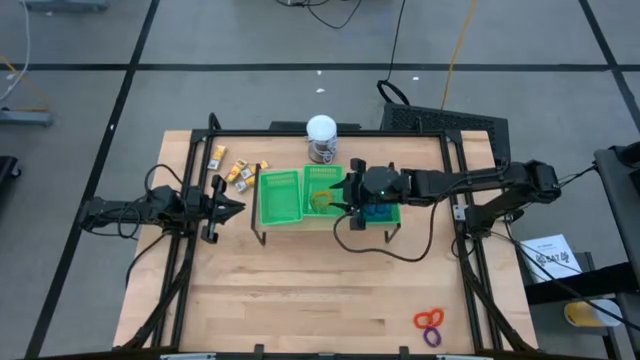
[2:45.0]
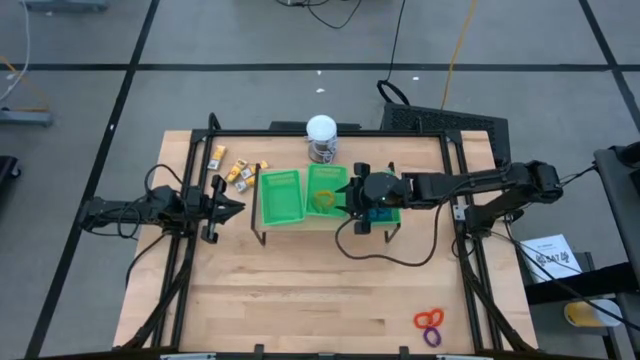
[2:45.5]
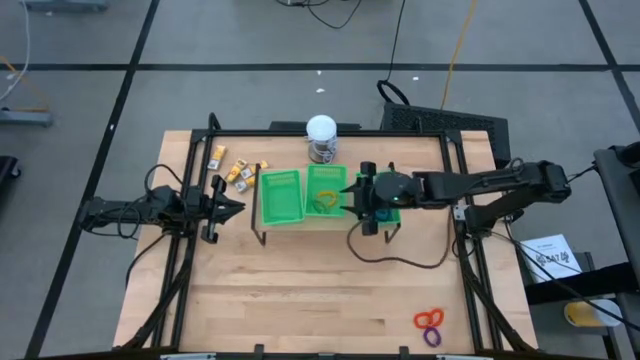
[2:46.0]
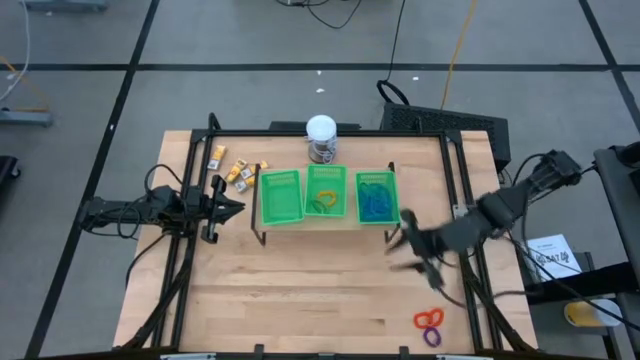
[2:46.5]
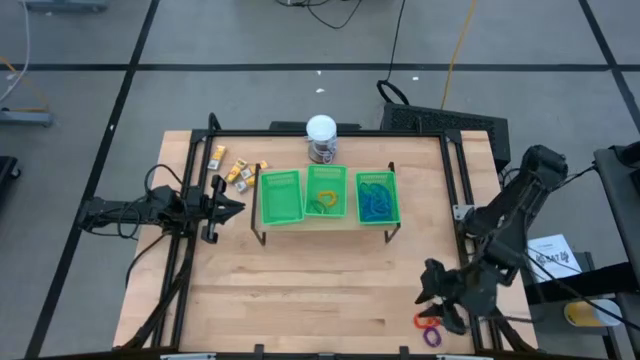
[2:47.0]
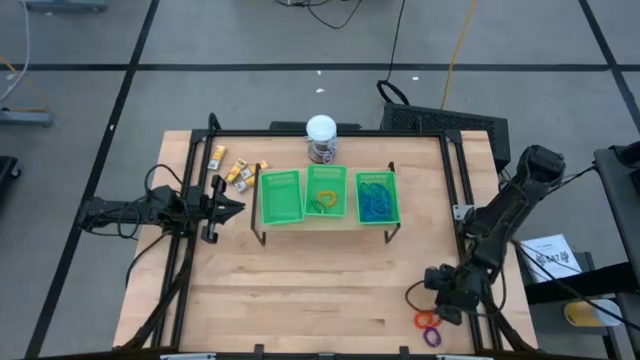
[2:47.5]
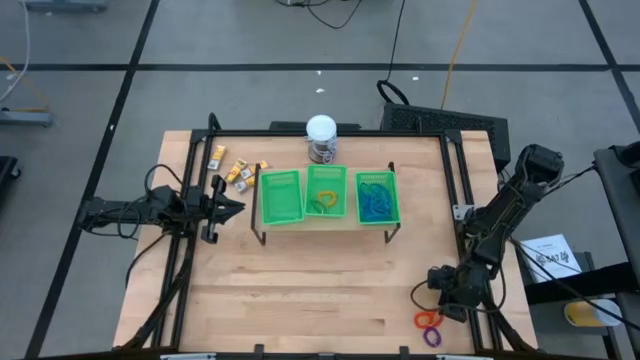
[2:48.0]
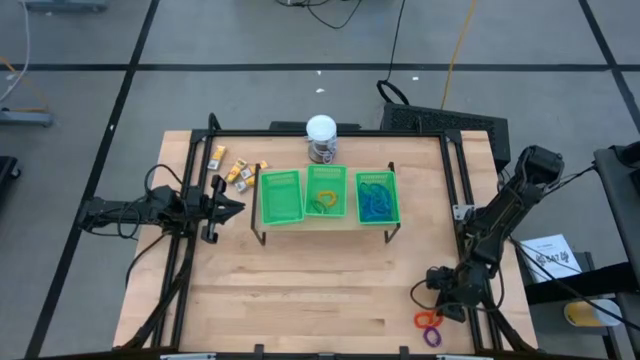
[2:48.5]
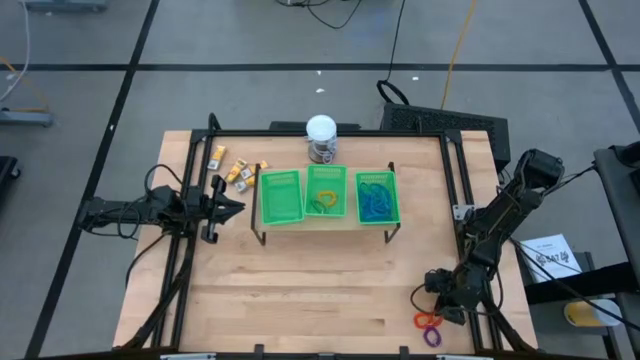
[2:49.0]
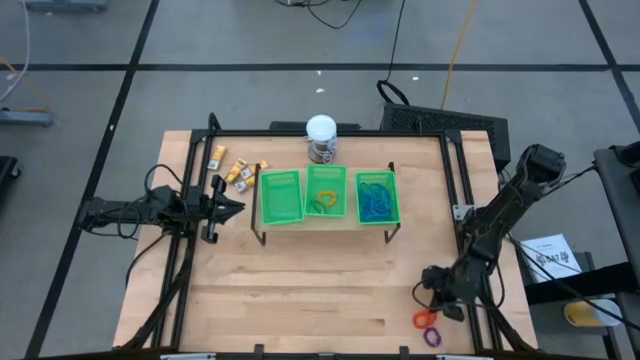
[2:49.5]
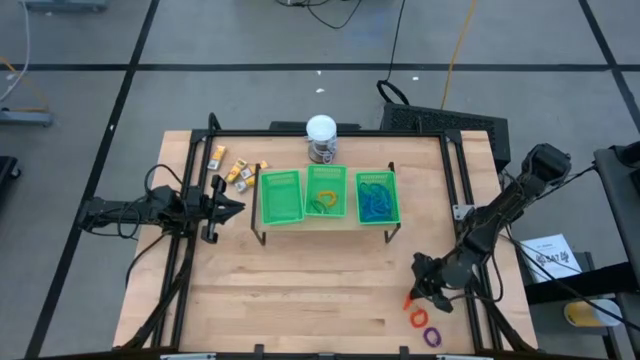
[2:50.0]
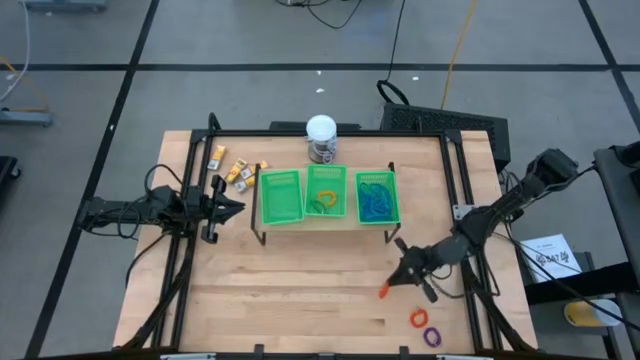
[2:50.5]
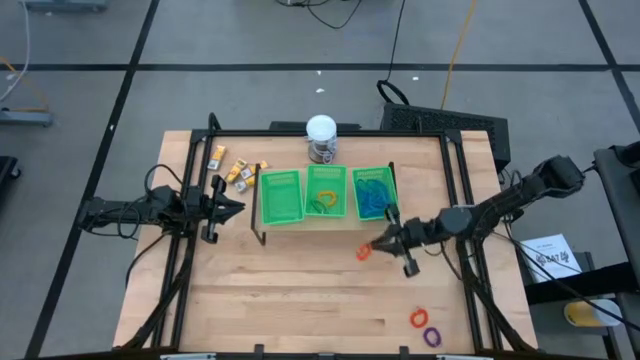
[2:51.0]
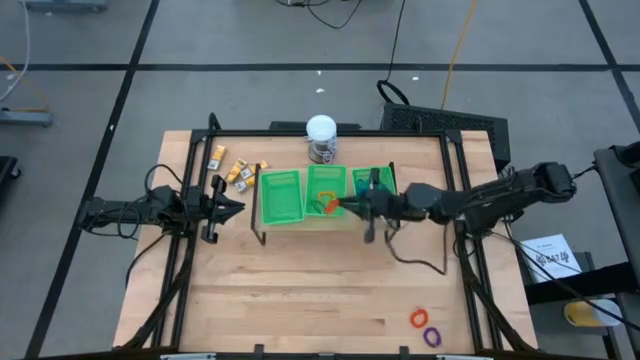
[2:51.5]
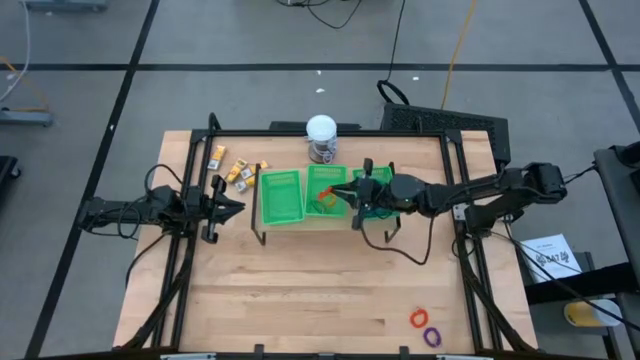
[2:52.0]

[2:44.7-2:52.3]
Task: Pick & Place Office Desk Supplies
Put the orange spring keychain into the center green bin on the shelf

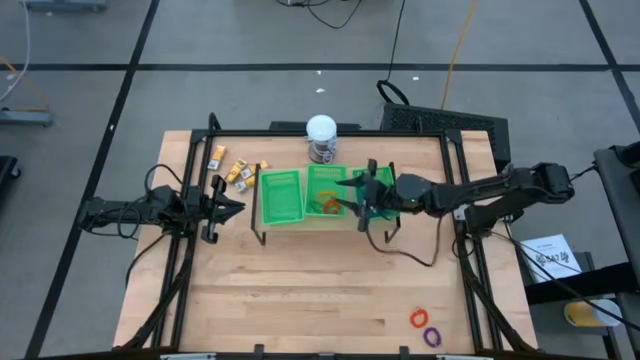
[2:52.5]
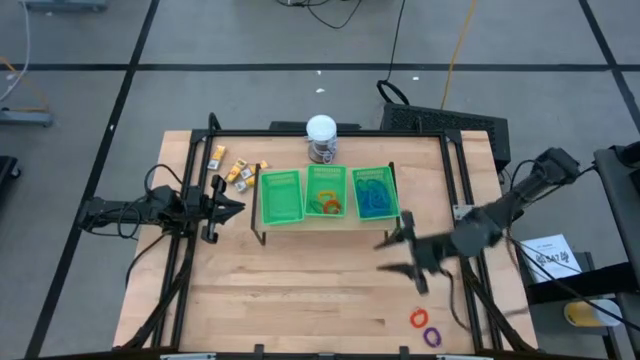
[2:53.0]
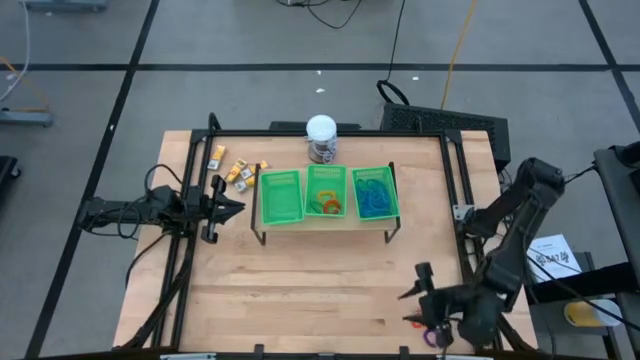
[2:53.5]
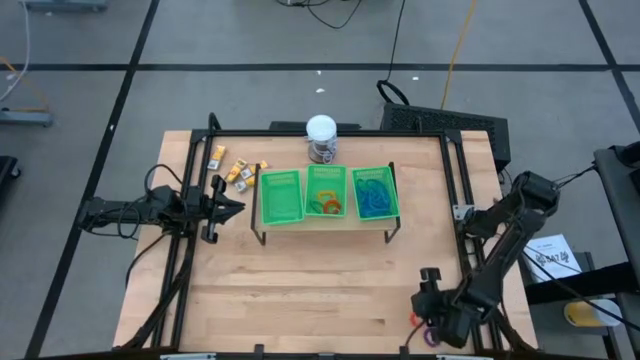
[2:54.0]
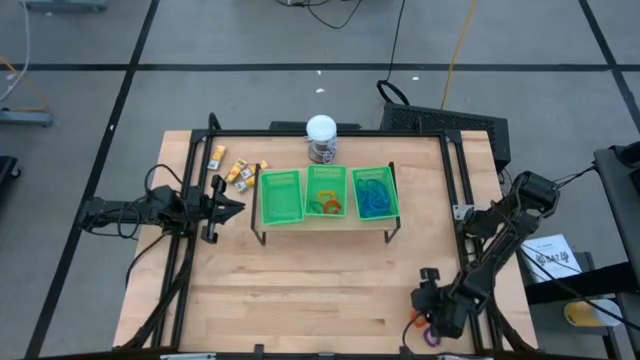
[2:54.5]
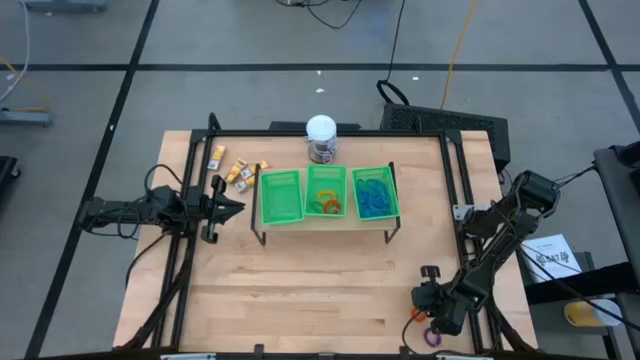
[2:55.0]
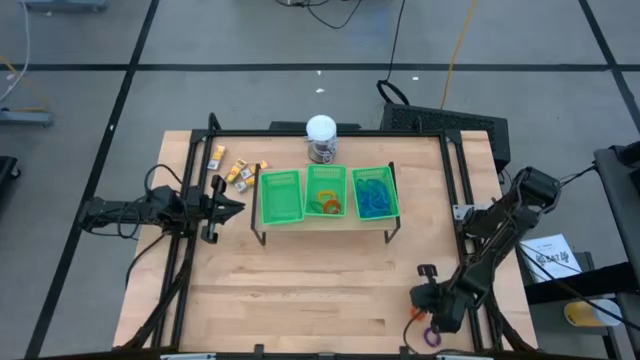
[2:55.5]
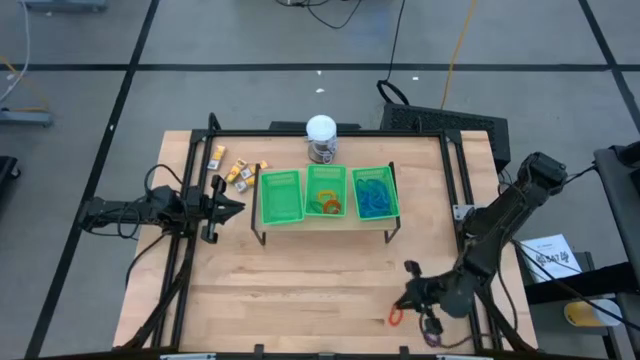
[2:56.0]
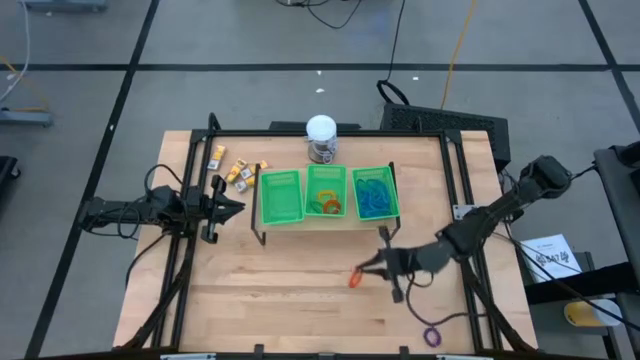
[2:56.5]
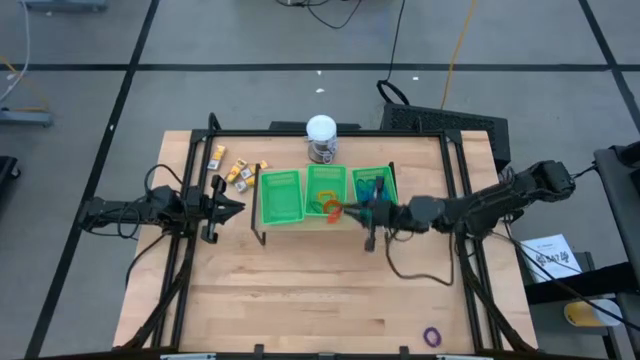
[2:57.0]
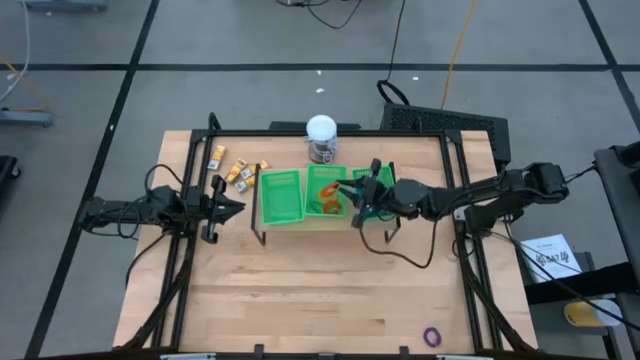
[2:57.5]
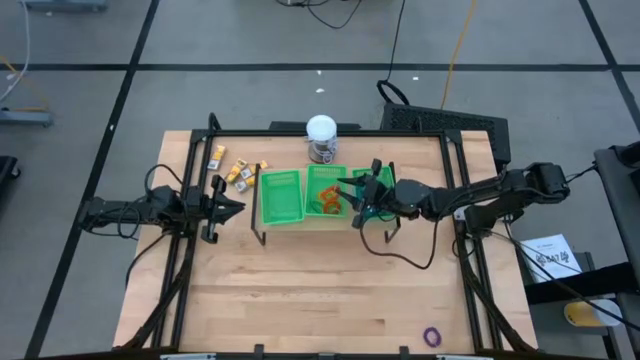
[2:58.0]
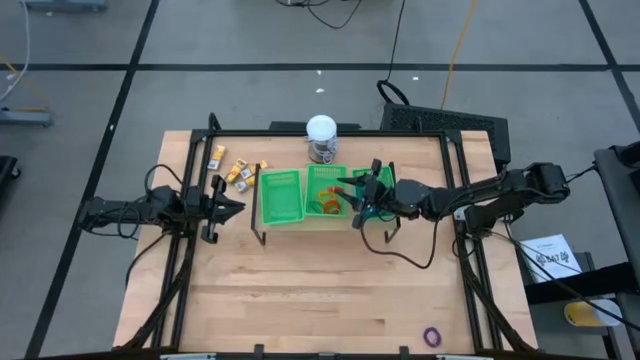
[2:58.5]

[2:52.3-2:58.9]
Put the orange spring keychain into the center green bin on the shelf

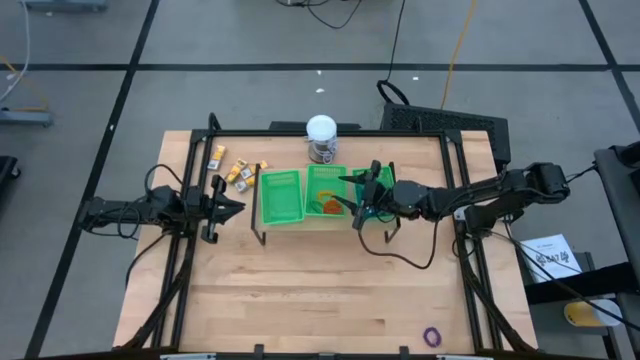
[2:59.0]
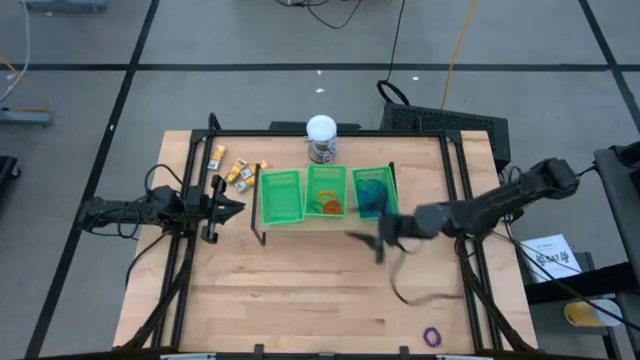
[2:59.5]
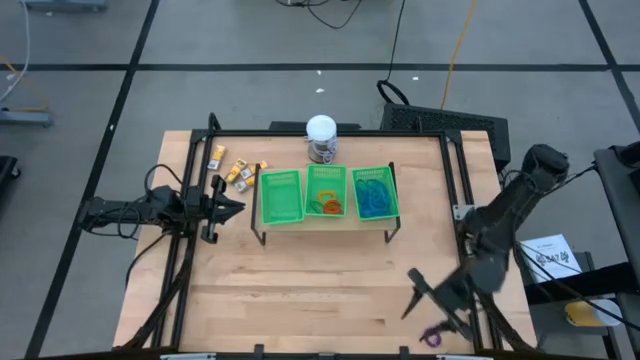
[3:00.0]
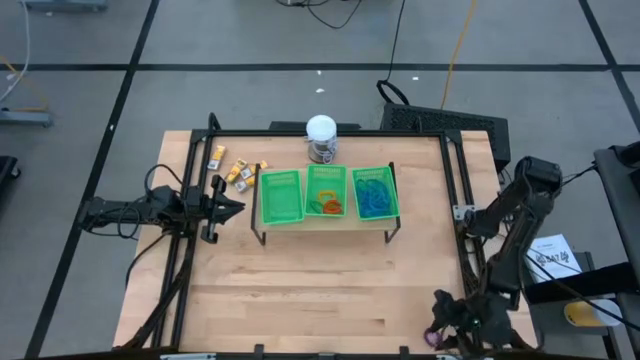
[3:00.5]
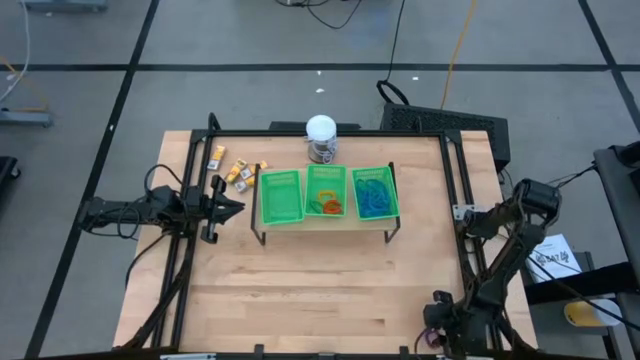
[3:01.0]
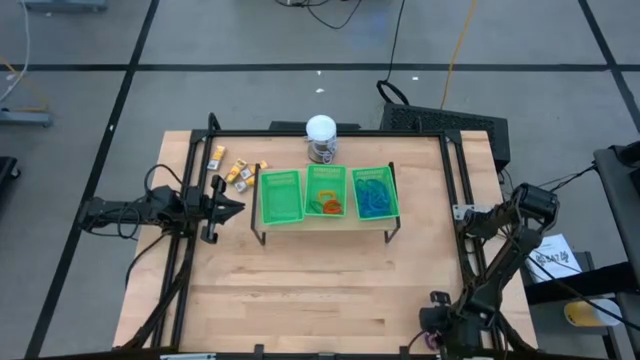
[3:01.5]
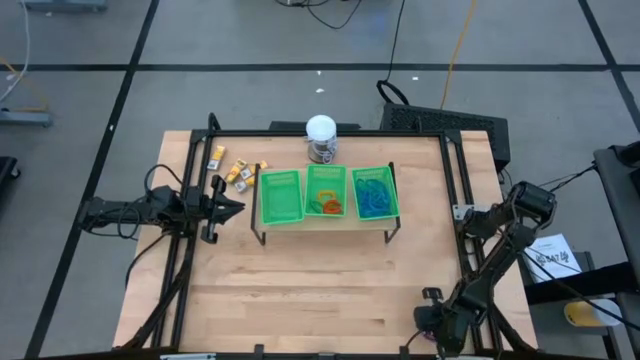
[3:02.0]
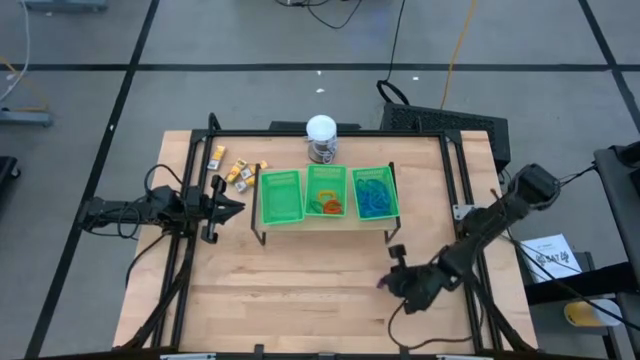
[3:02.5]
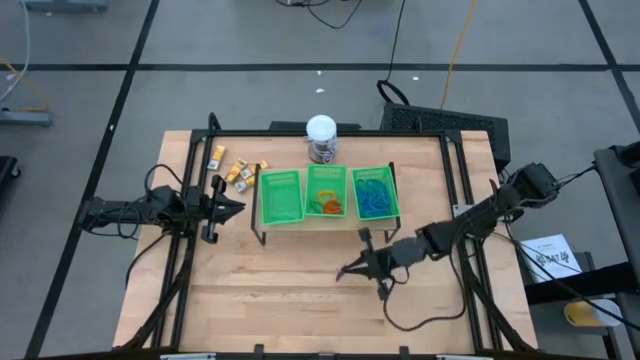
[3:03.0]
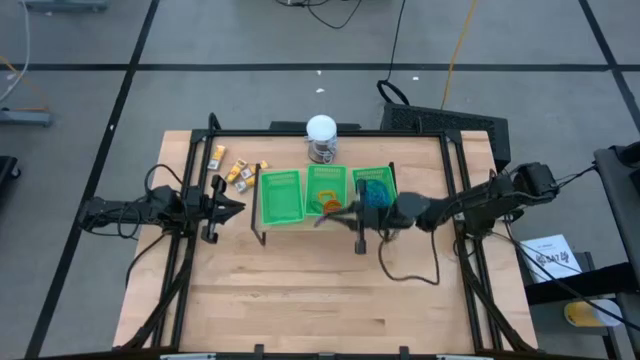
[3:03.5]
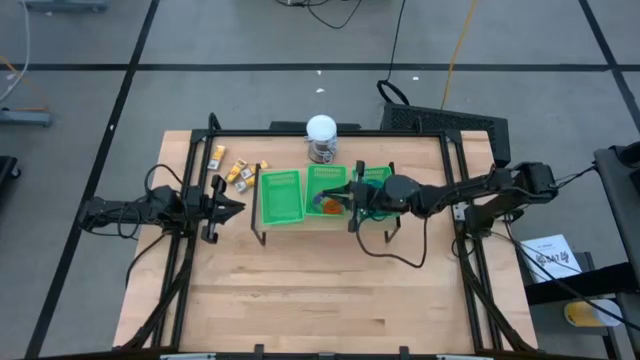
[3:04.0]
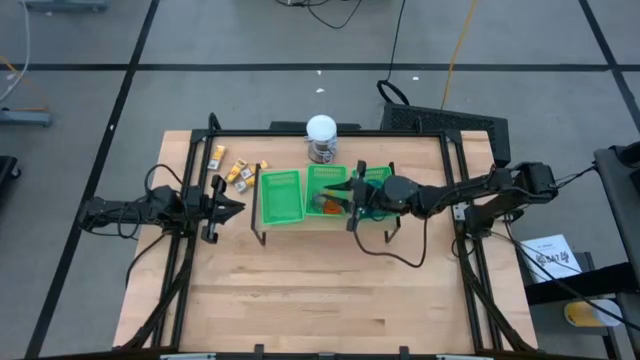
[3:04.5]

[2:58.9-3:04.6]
Put the purple spring keychain into the center green bin on the shelf

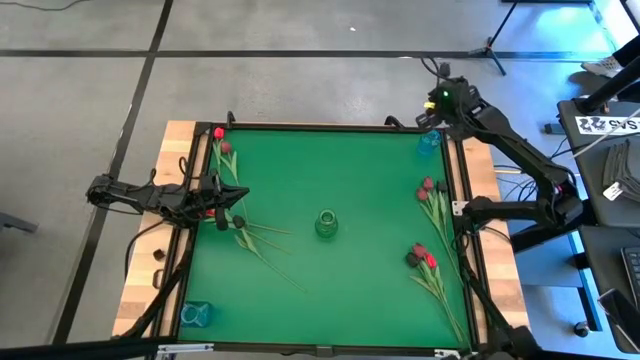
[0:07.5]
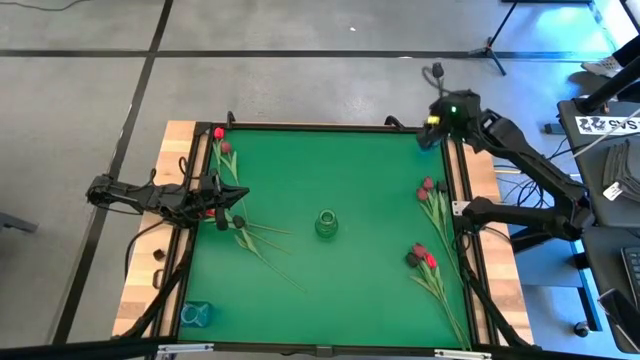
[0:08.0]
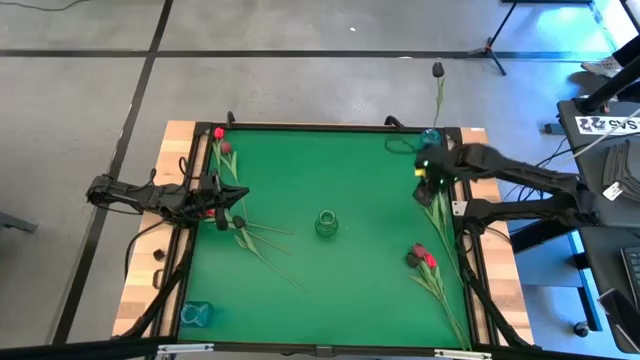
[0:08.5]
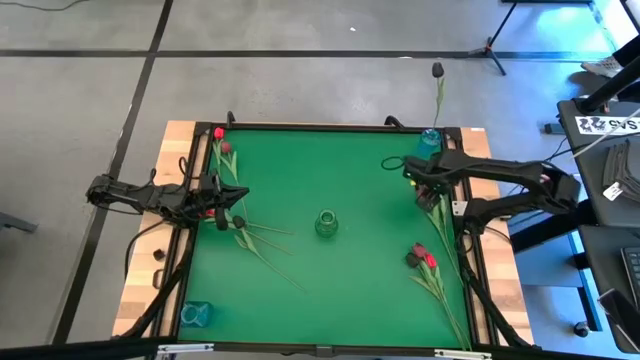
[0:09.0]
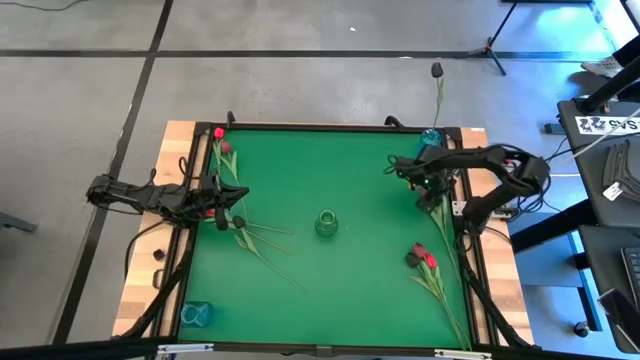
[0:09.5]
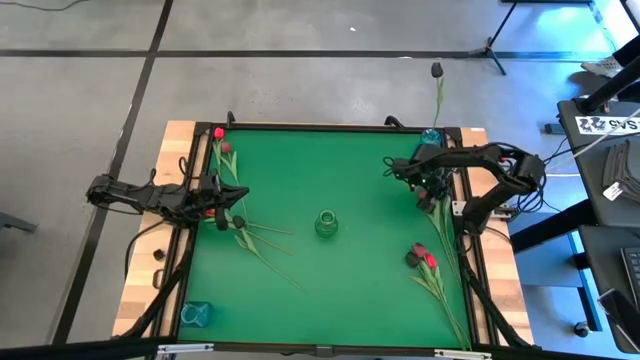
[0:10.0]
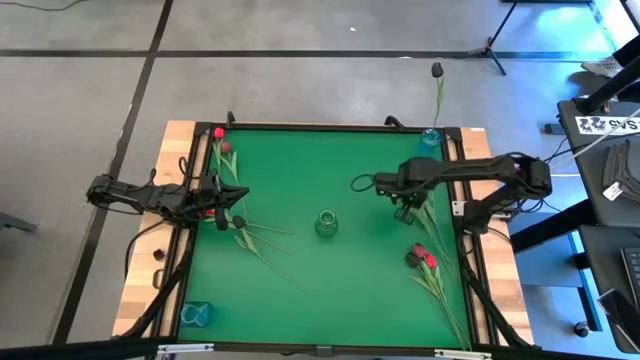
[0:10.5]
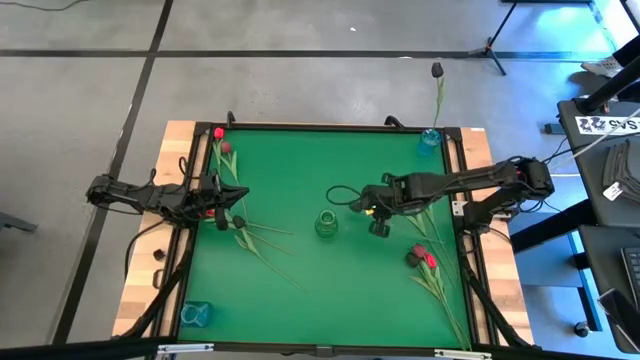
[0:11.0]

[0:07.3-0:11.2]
Task: Sort flowers into vase by color
Put the top right black flower into the top right blue vase
